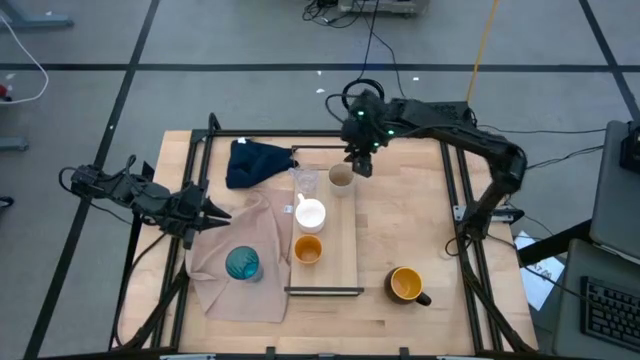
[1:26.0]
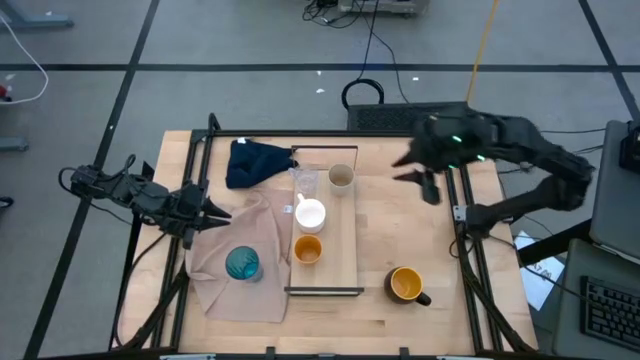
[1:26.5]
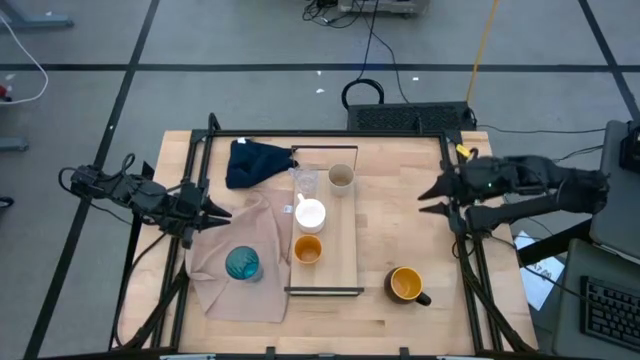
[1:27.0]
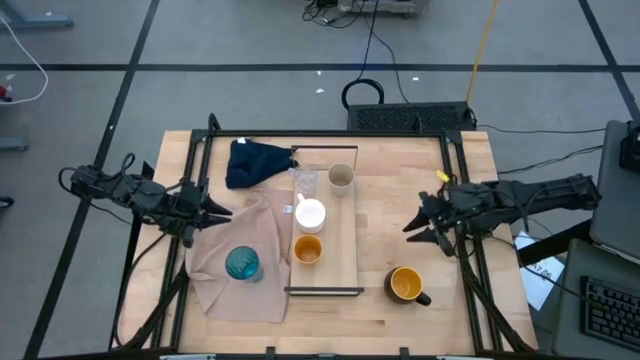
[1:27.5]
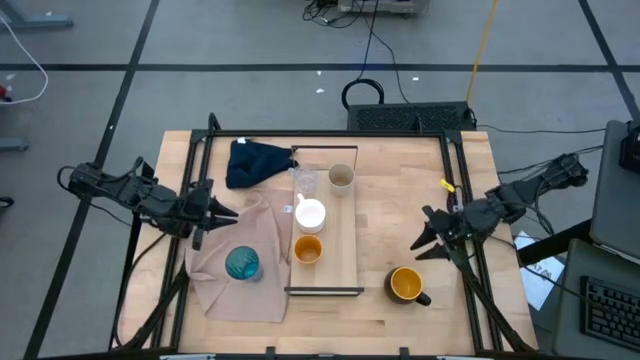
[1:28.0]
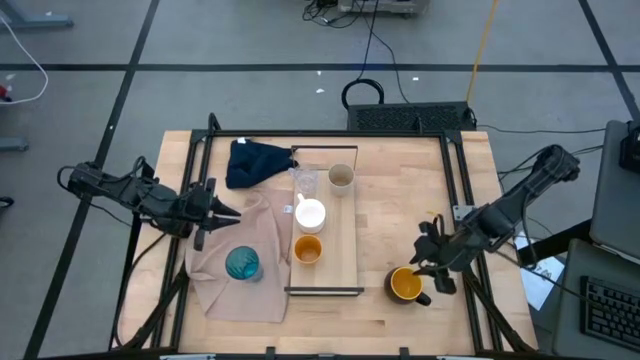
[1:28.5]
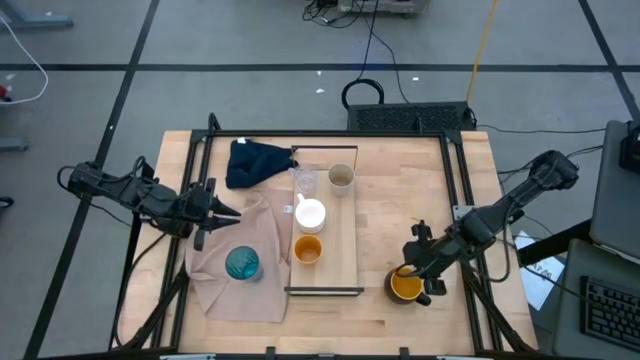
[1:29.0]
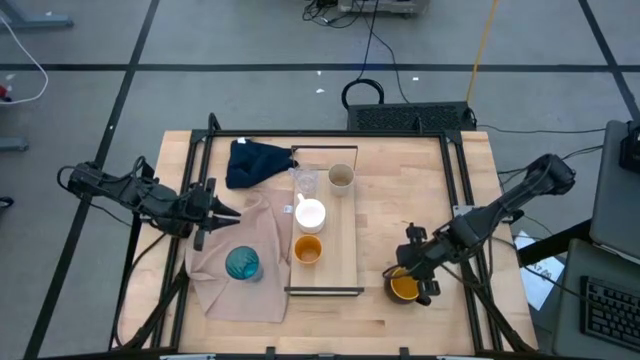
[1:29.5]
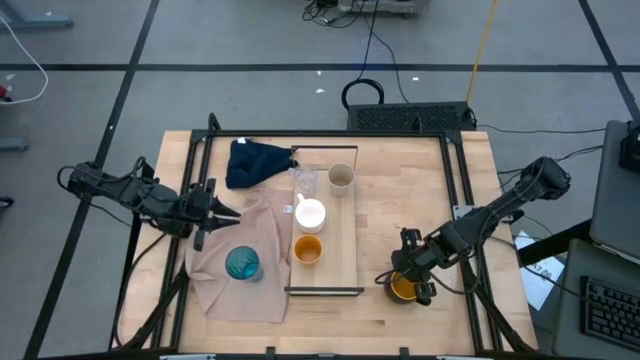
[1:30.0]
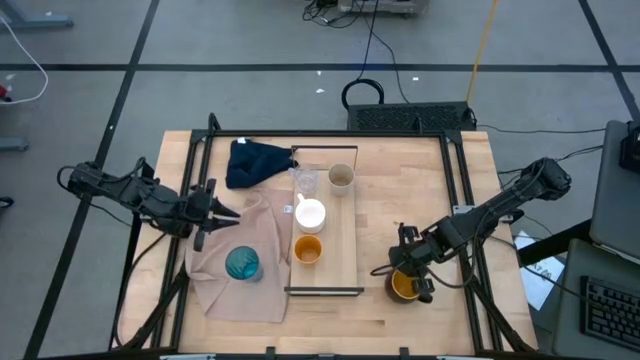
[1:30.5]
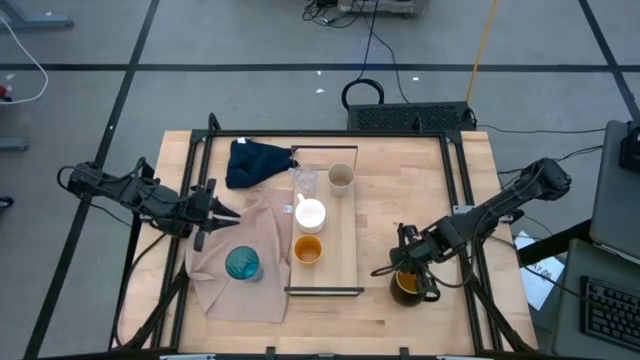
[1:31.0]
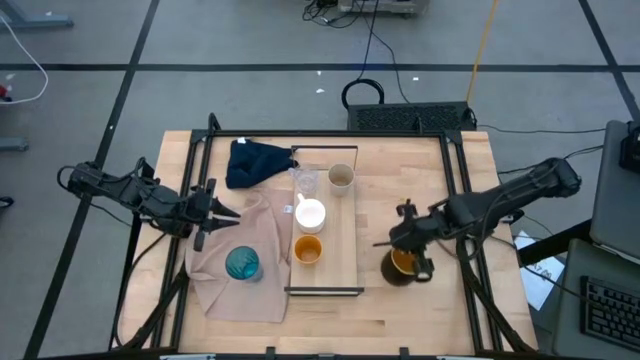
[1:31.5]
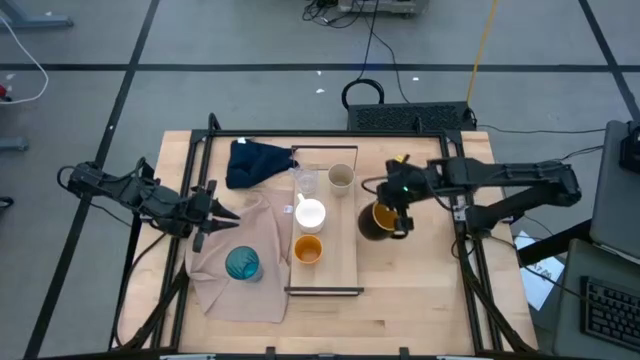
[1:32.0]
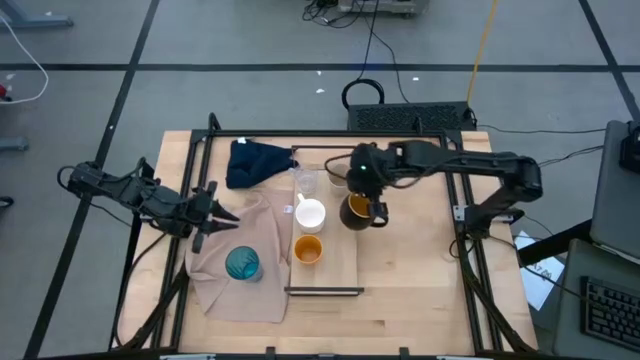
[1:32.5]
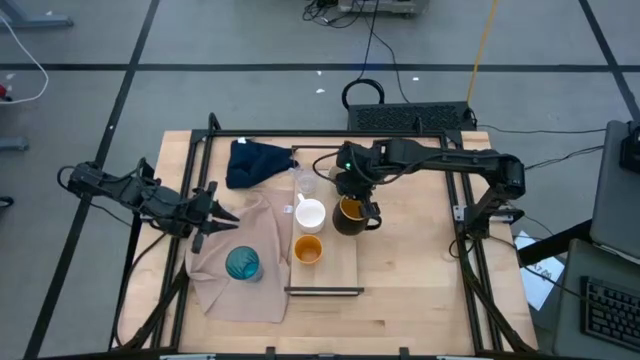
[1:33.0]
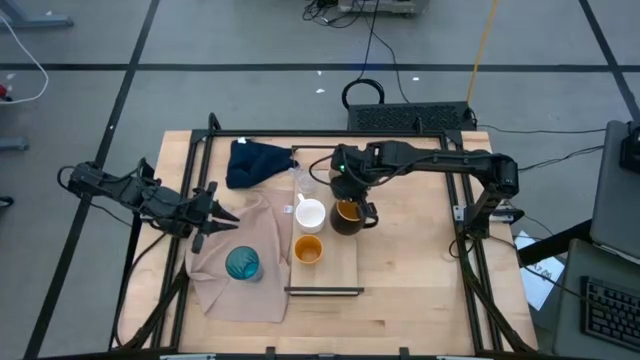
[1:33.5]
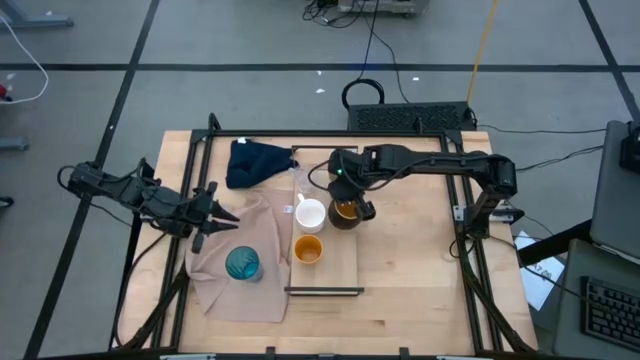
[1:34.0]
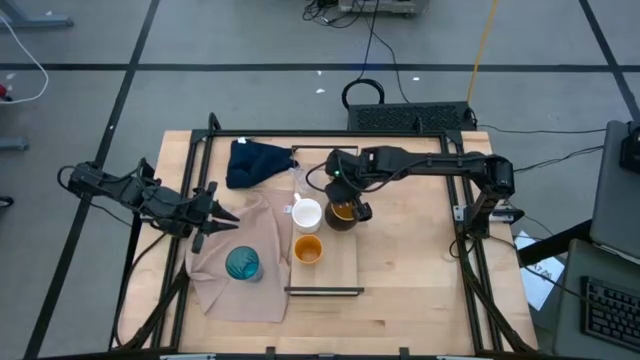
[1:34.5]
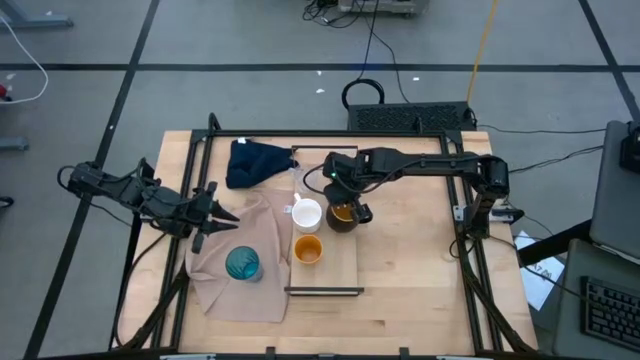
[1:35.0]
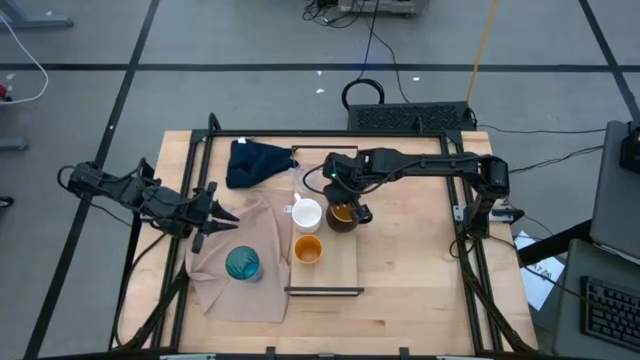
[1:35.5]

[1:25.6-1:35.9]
Task: Stack small to large cups/mugs on shelf
Put the black mug on the shelf

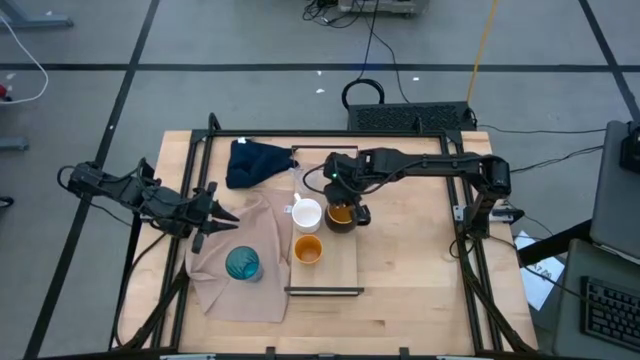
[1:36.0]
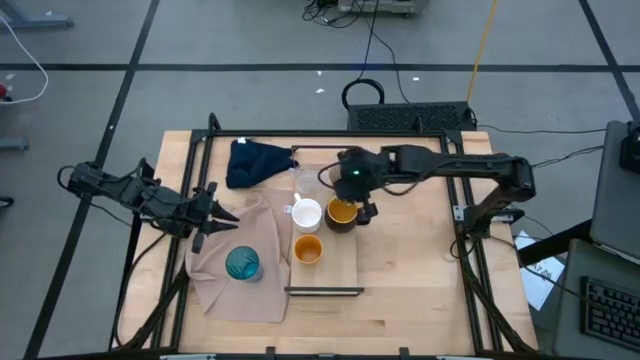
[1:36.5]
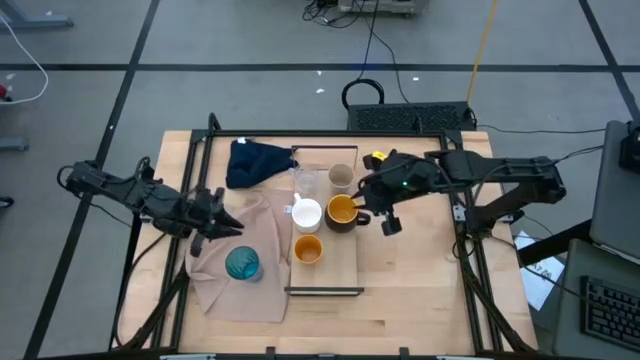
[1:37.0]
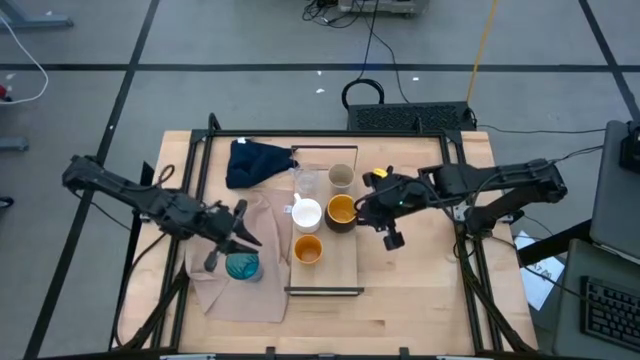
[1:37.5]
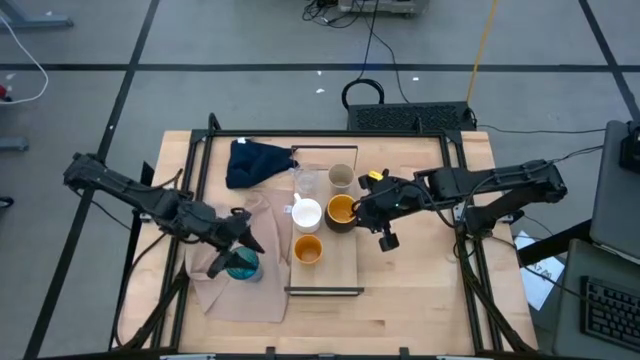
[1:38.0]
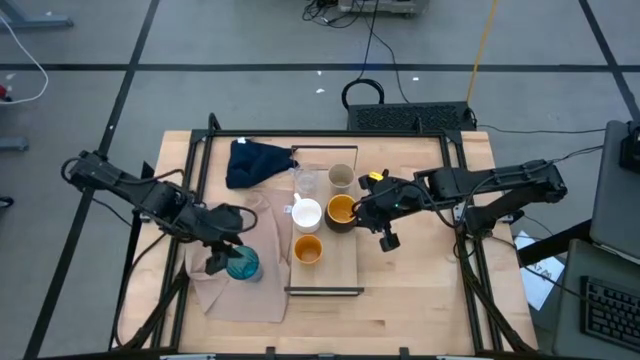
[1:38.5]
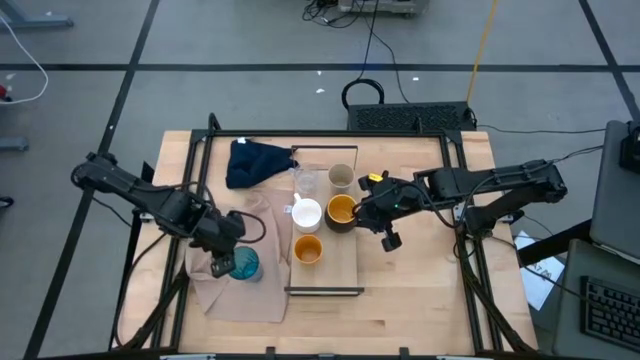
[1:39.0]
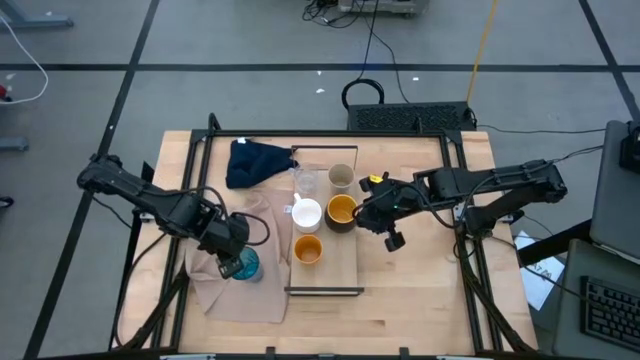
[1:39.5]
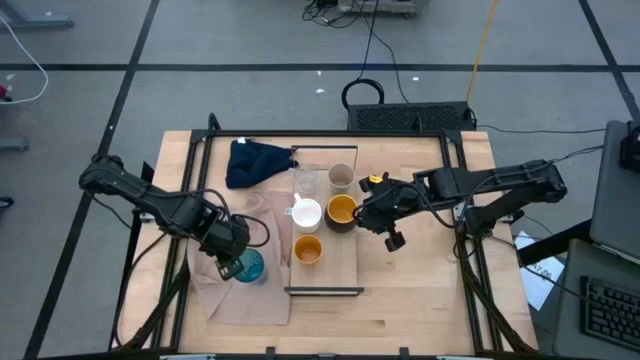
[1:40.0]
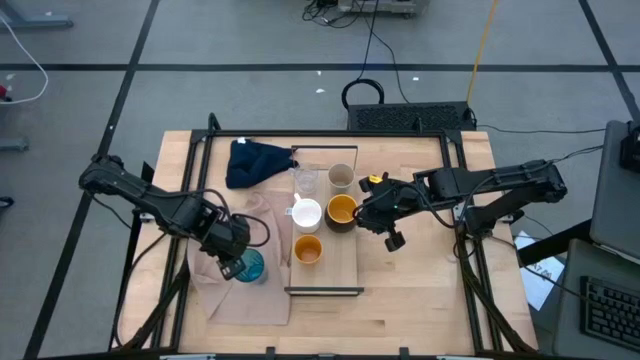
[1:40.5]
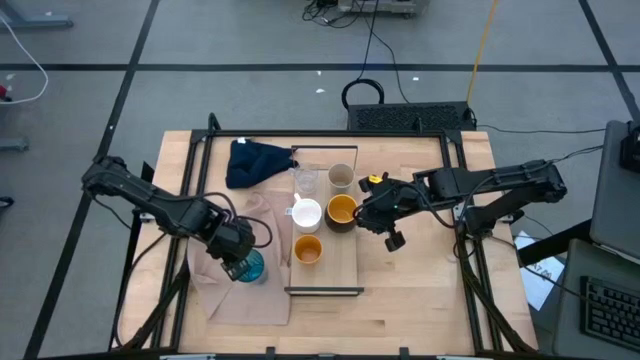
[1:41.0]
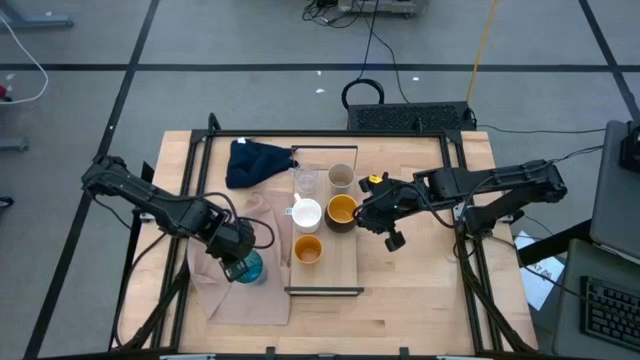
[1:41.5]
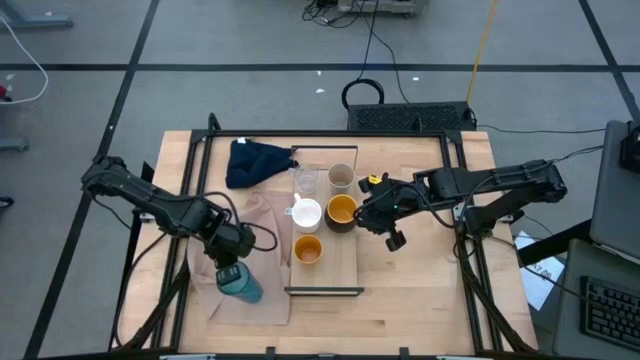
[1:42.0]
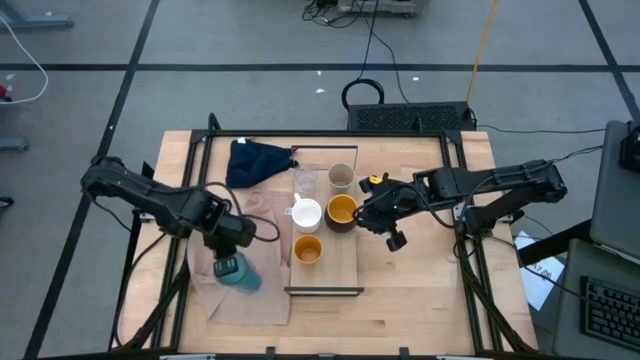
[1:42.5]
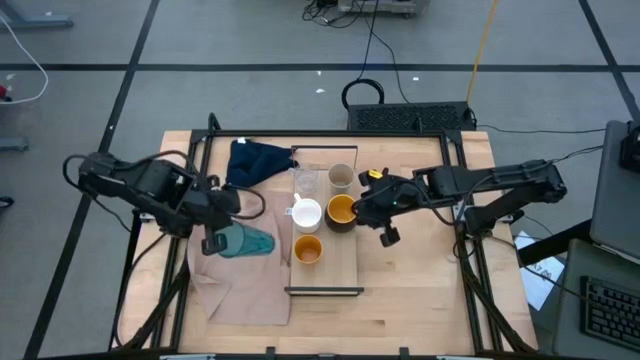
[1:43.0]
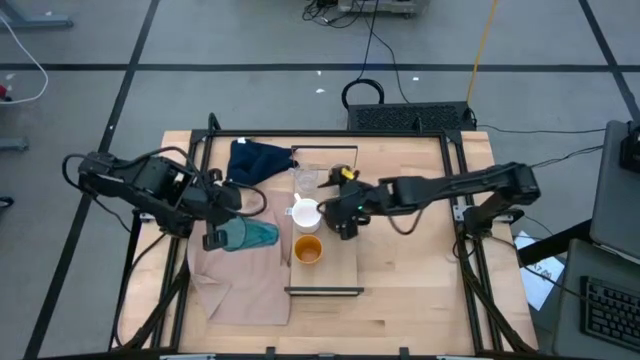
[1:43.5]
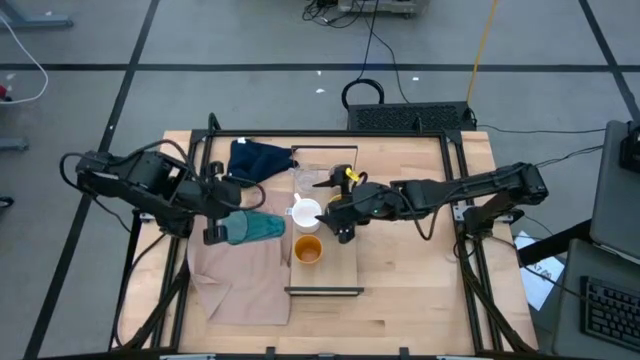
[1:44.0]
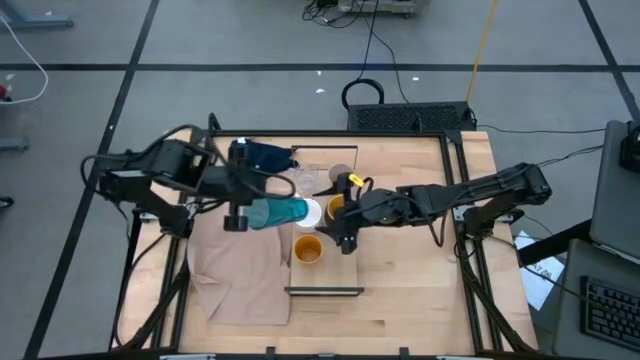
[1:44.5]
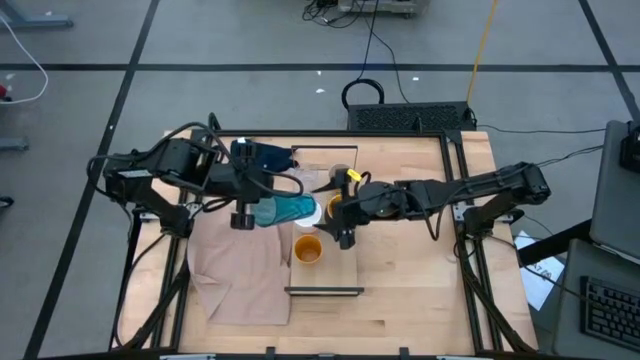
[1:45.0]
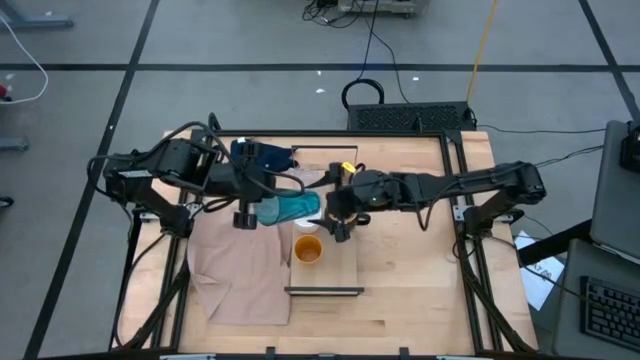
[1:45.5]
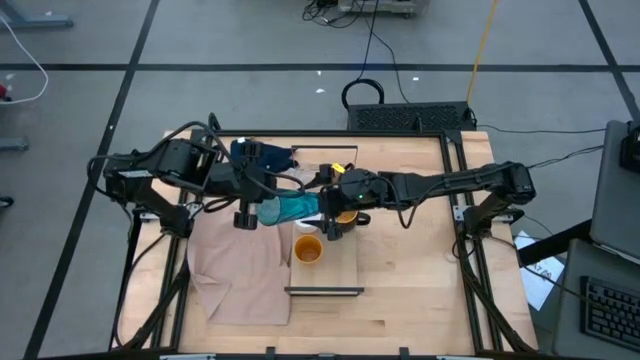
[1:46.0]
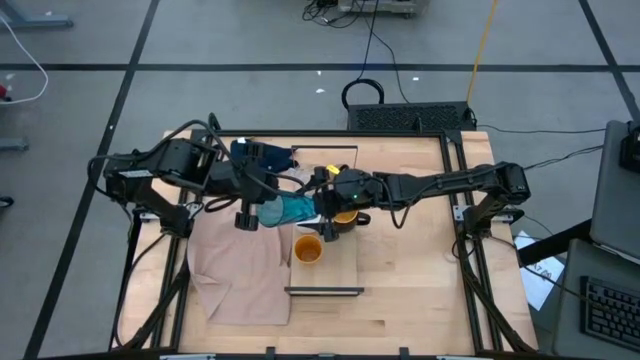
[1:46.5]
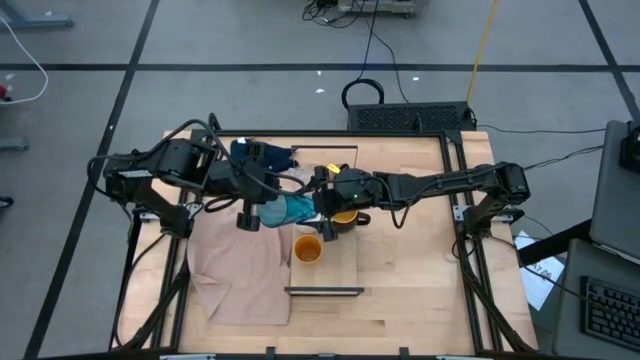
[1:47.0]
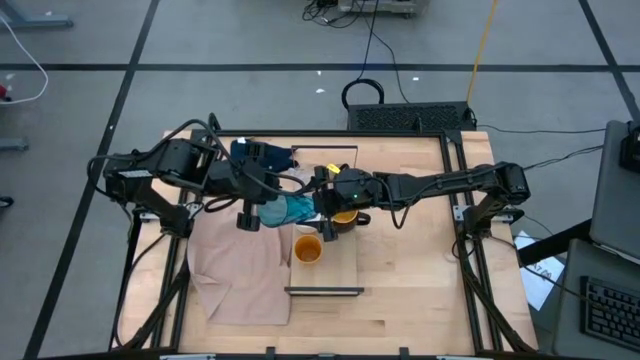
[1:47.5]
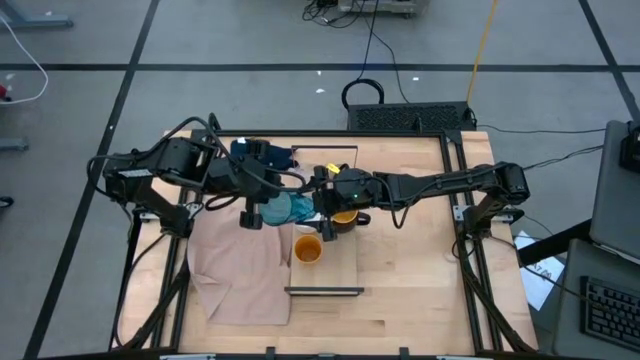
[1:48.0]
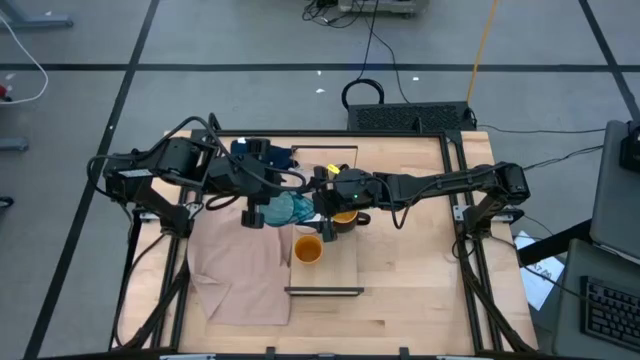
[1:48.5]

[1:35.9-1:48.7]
Put the transparent blue glass on the shelf
